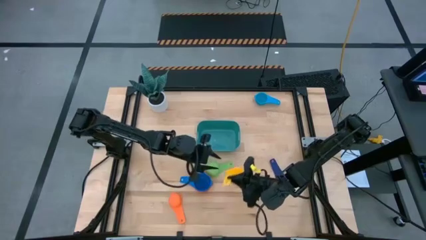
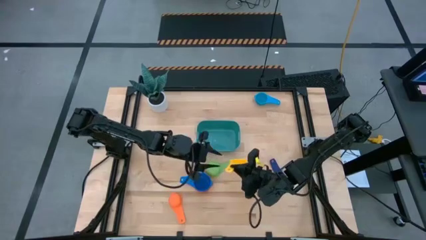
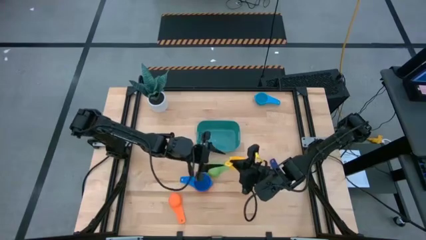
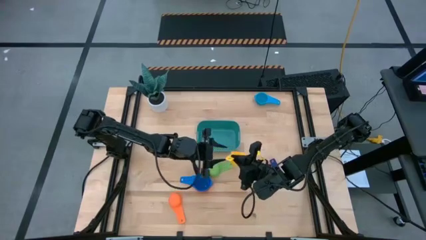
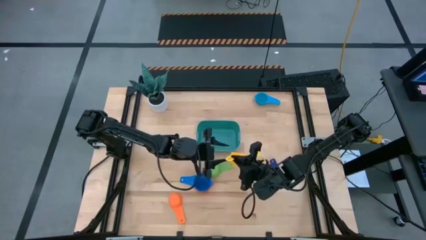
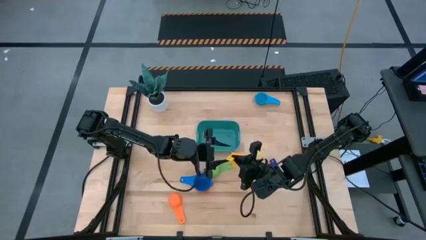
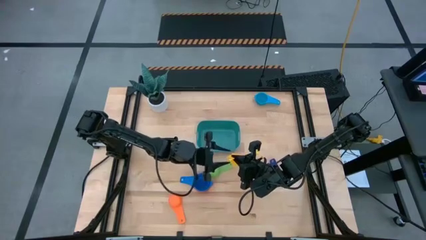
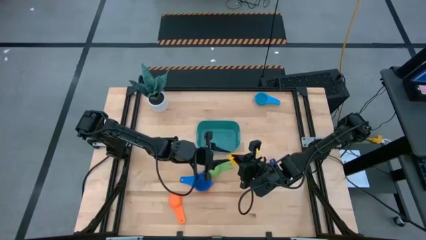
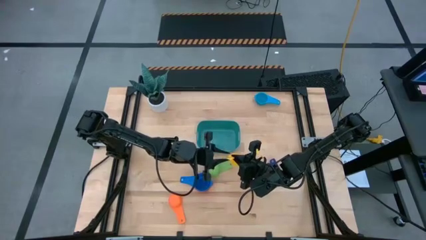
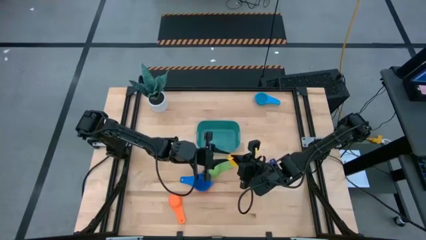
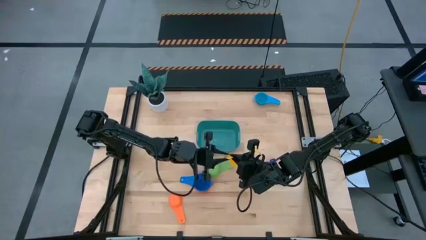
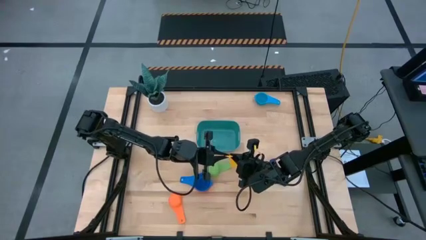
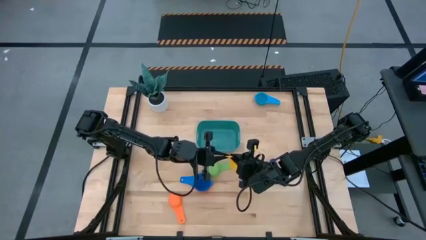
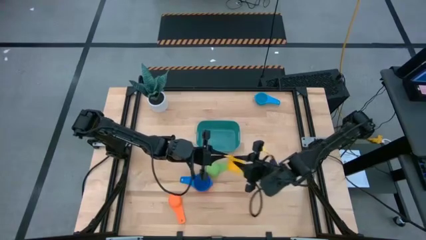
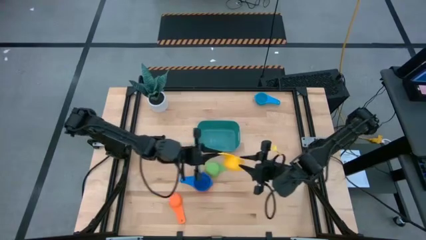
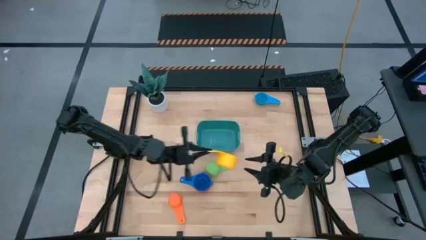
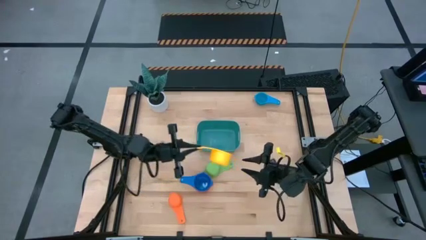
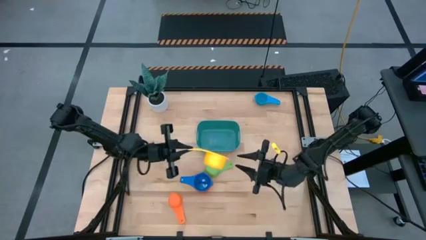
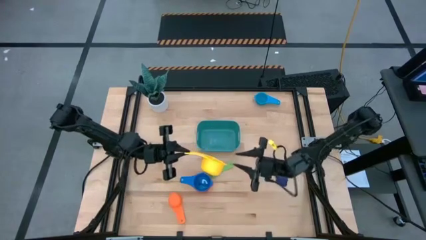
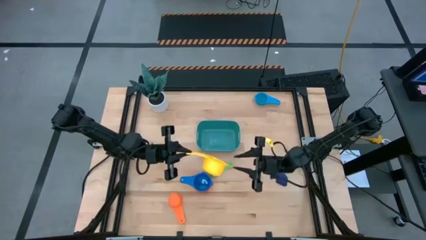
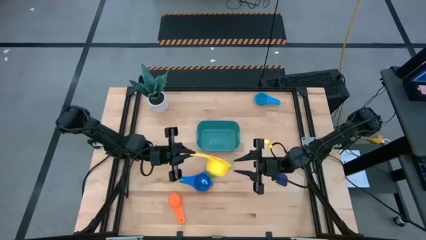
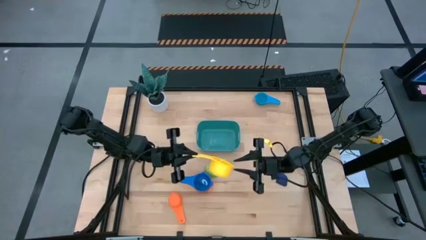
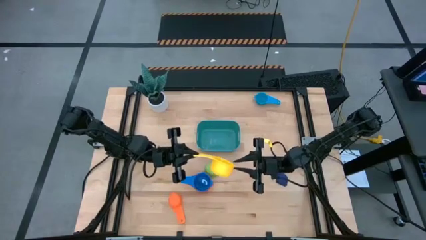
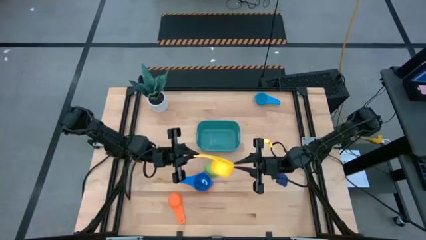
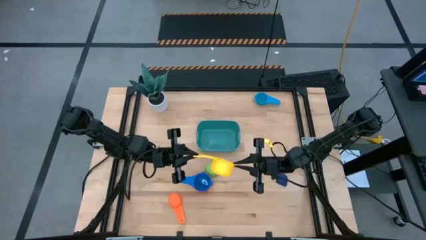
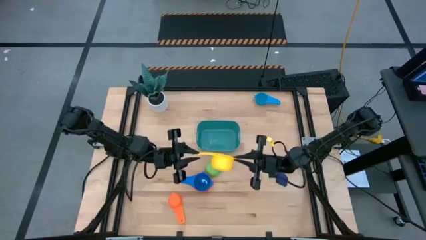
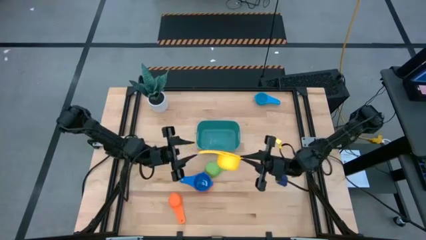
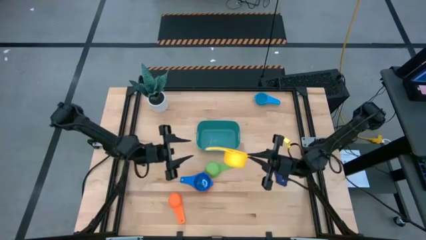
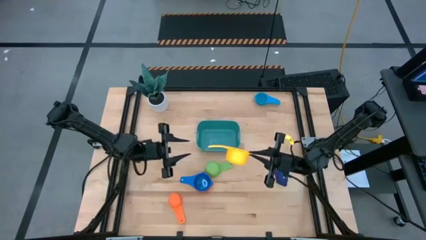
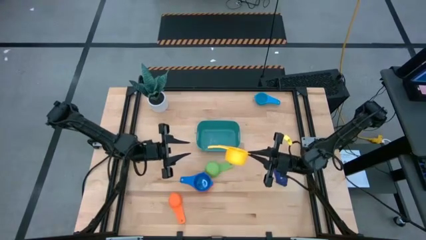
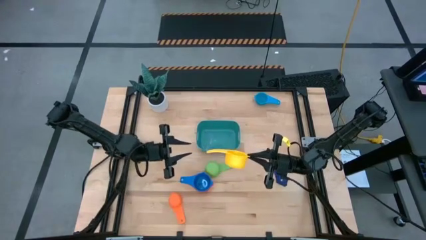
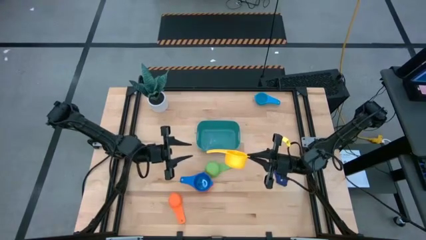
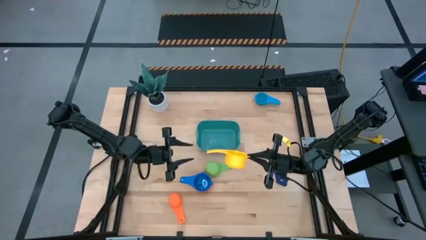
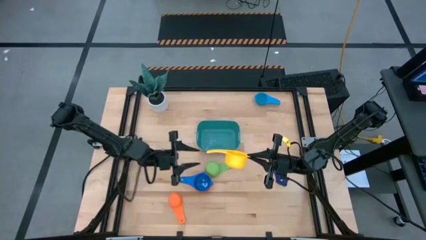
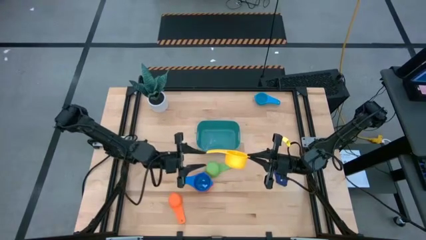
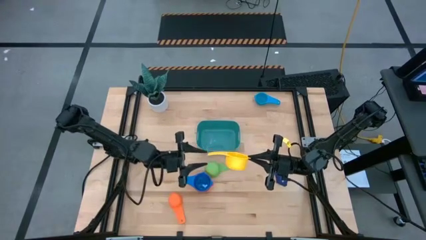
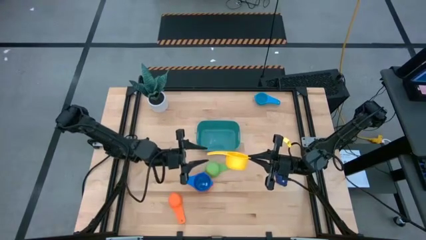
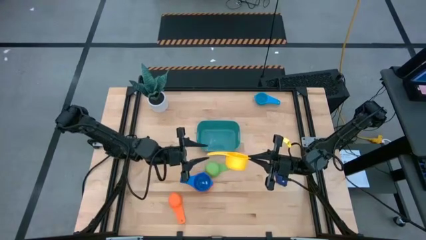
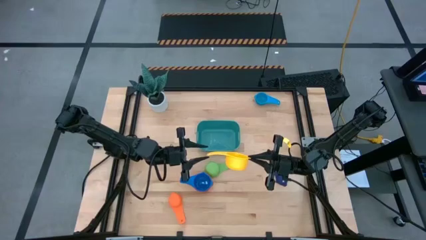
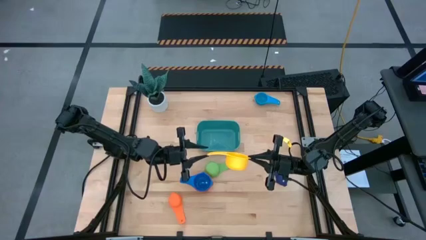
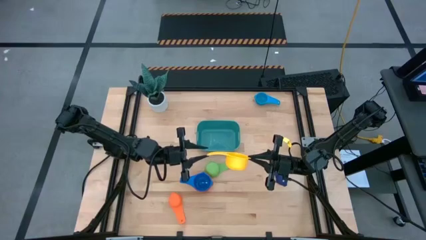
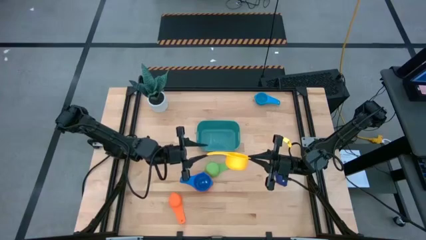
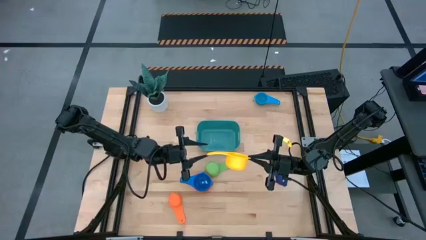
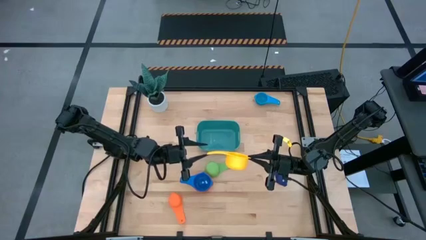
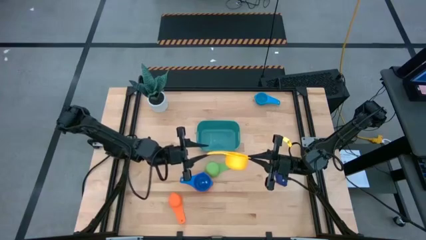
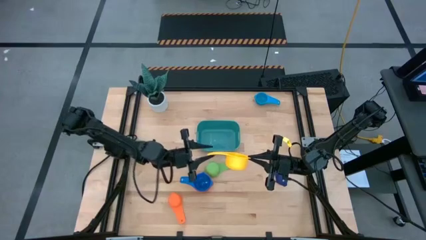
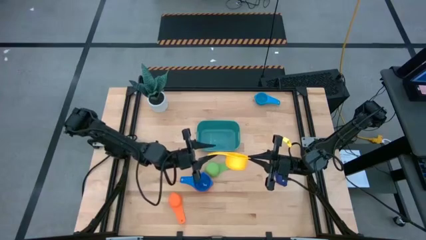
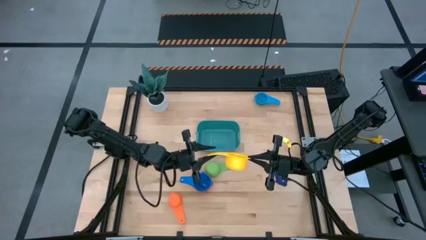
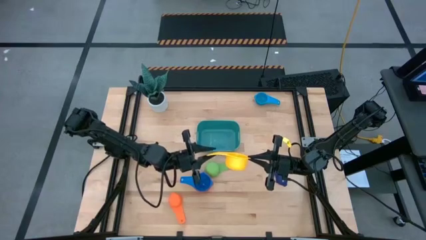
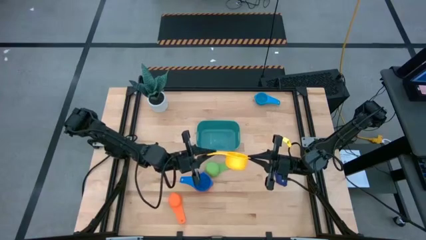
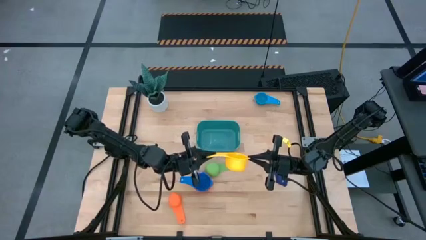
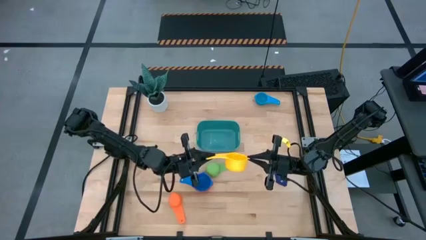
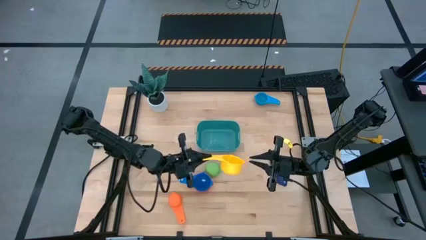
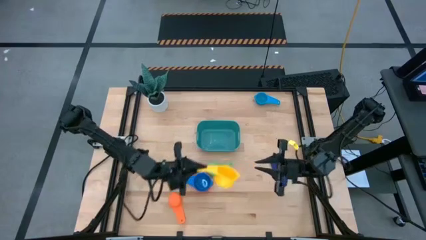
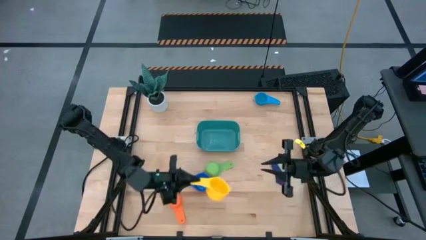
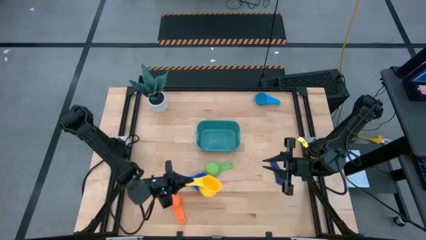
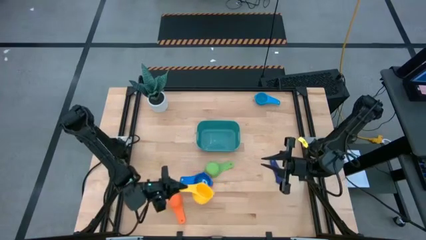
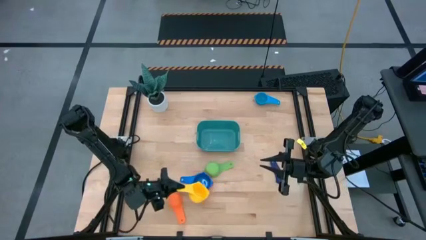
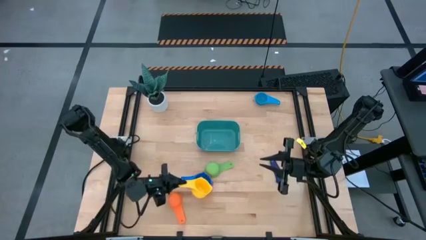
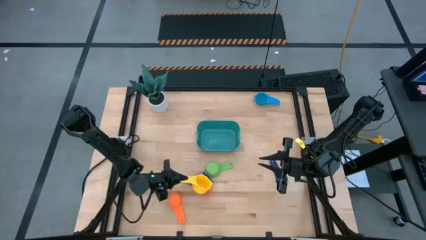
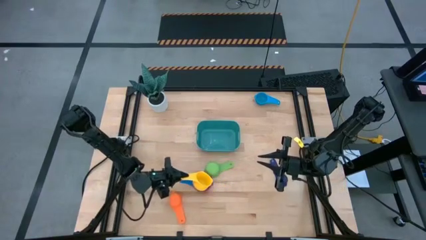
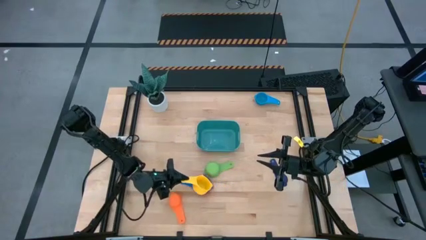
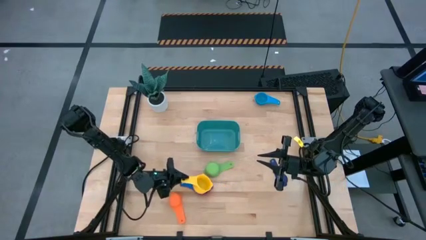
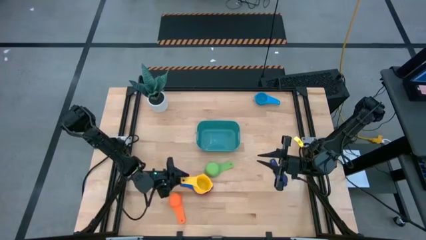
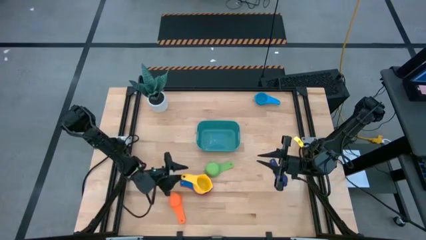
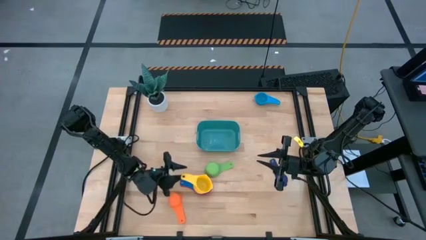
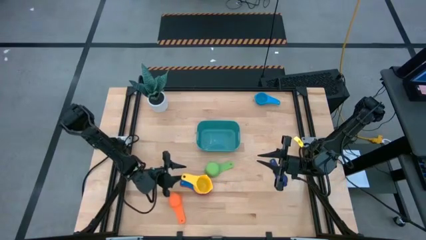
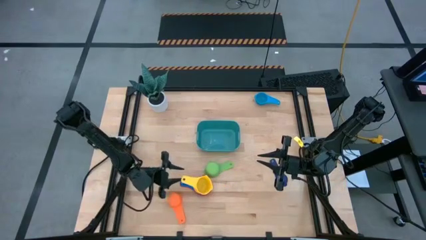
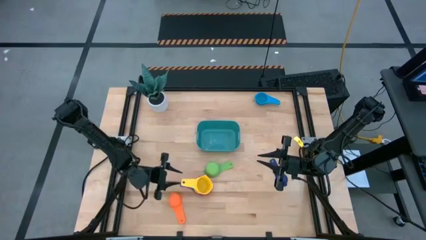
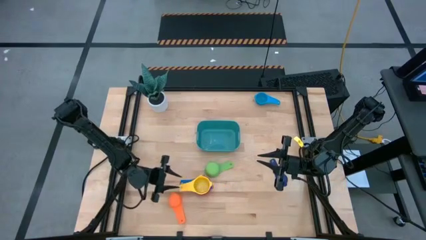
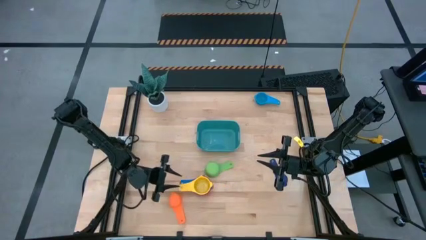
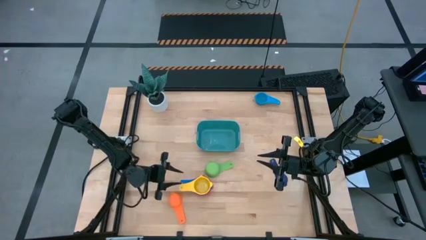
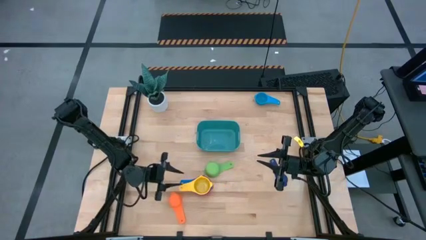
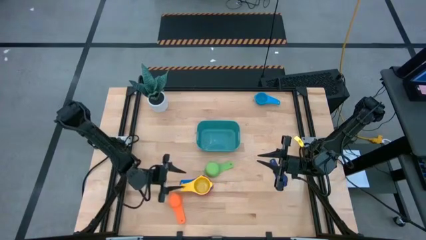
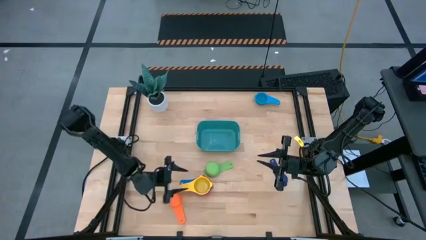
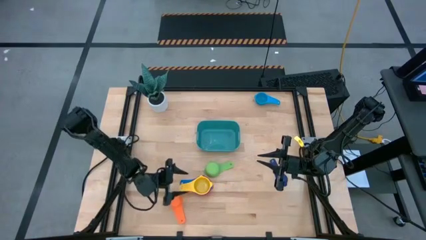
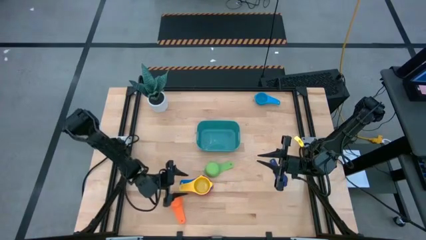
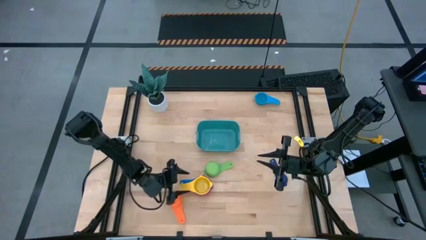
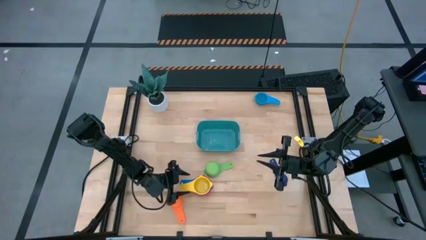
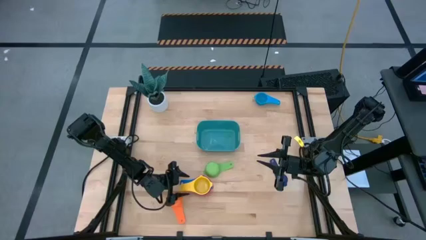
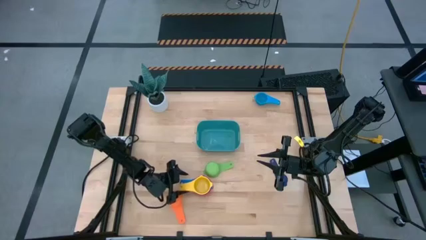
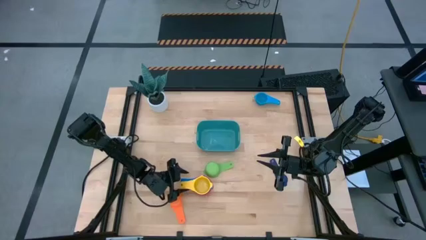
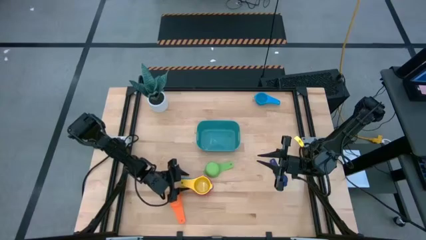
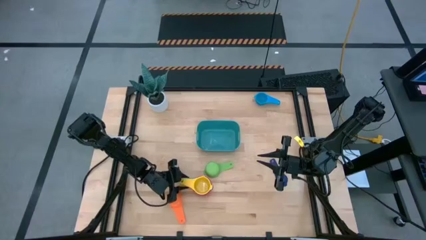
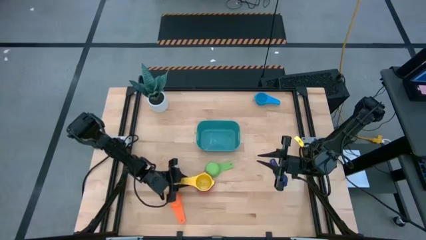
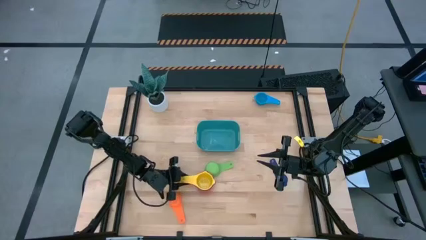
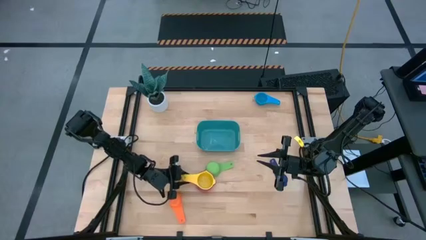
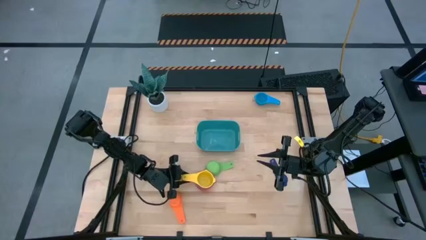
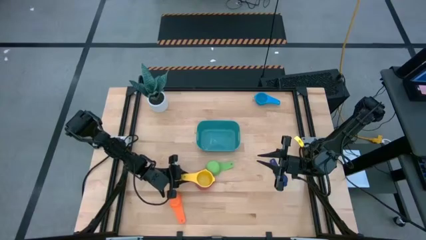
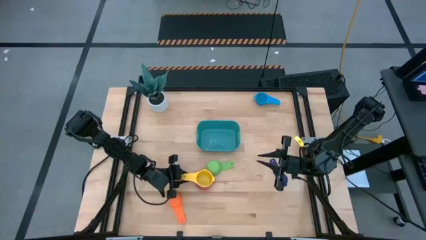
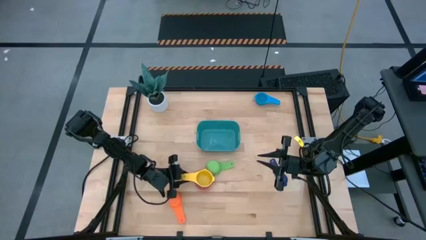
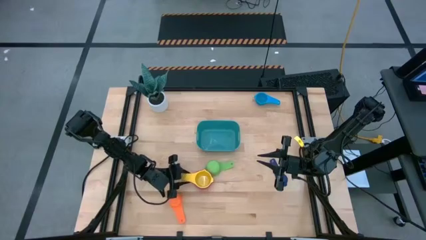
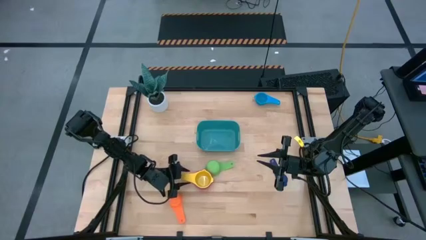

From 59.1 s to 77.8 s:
Task: Nest measuring cups in basket
Stack the yellow measuring cup on top of the blue measuring cup
